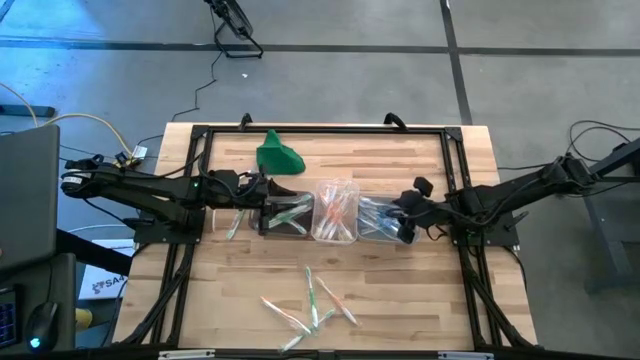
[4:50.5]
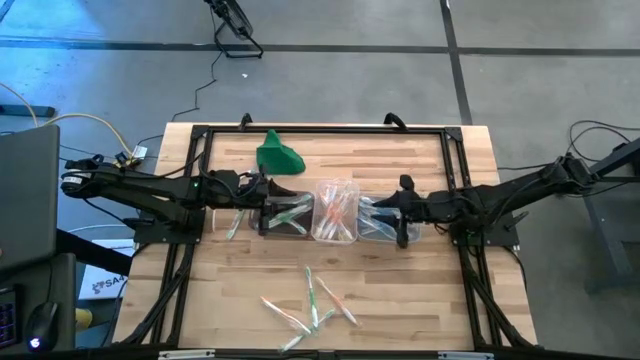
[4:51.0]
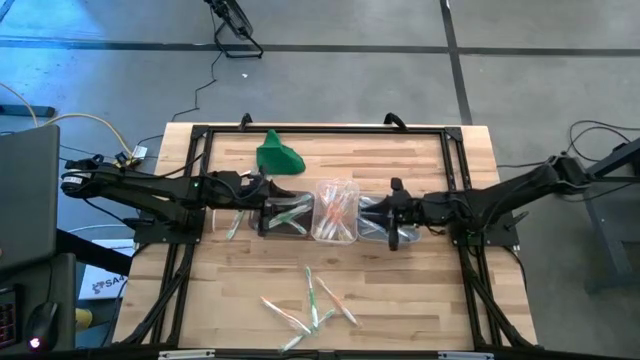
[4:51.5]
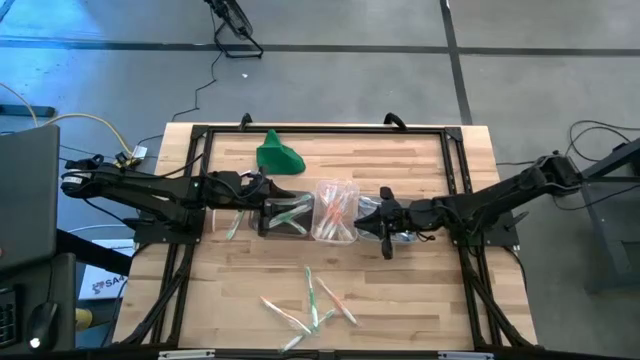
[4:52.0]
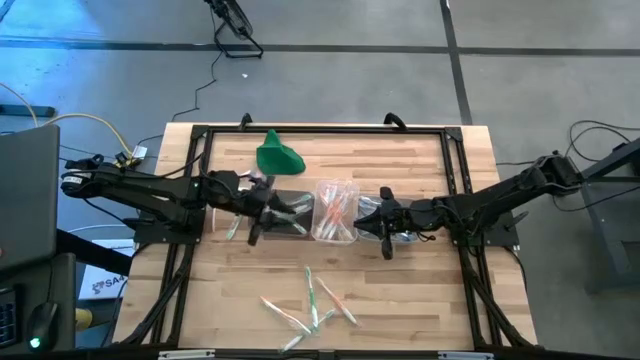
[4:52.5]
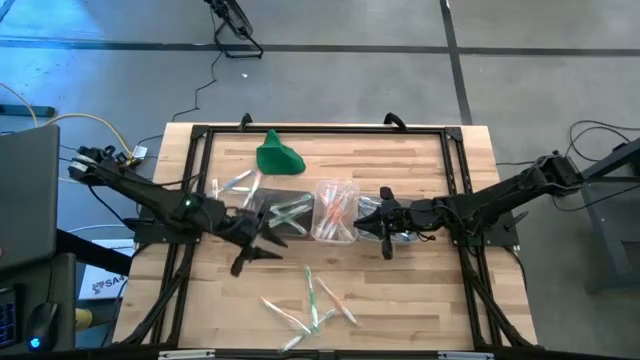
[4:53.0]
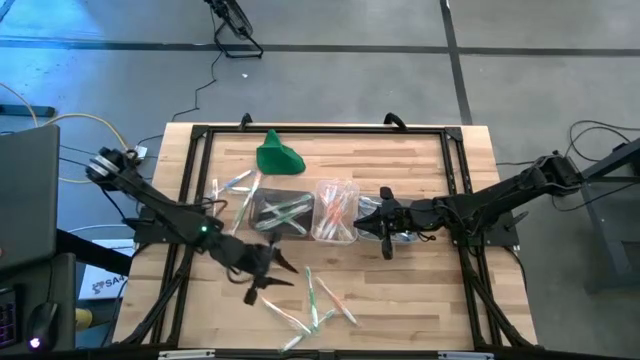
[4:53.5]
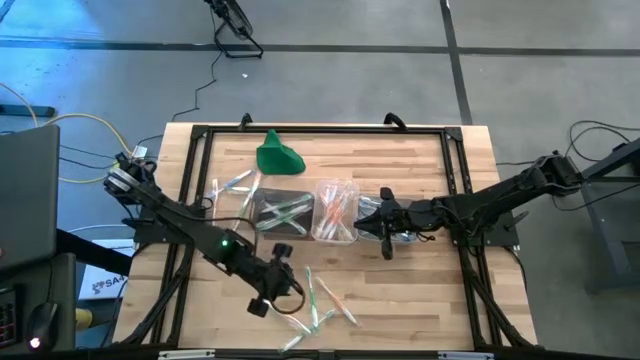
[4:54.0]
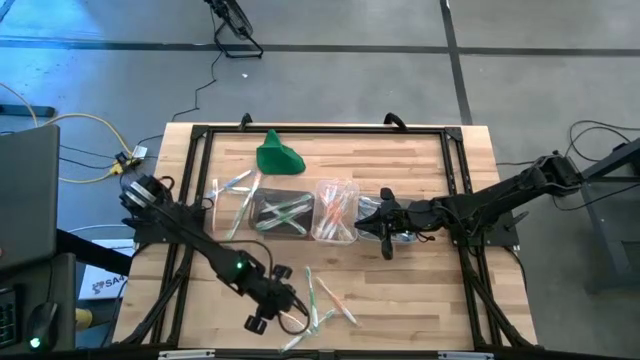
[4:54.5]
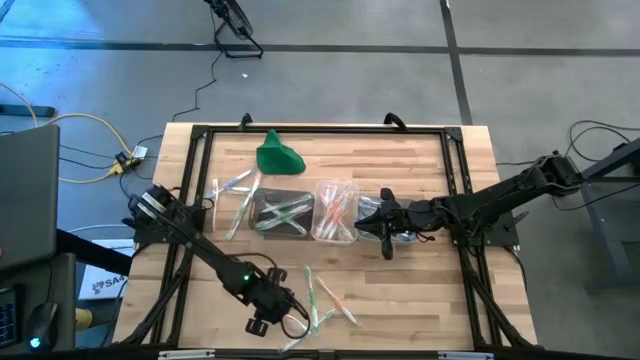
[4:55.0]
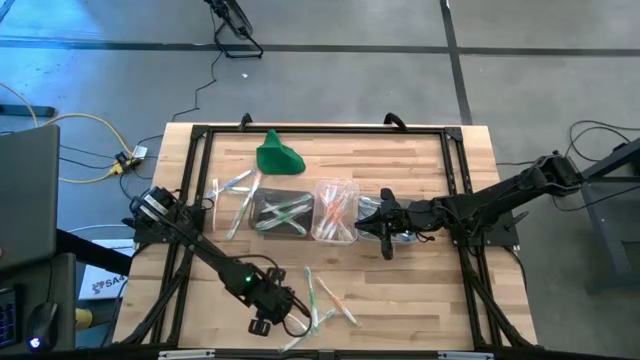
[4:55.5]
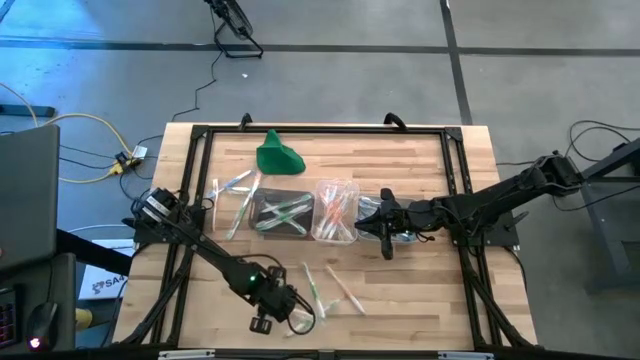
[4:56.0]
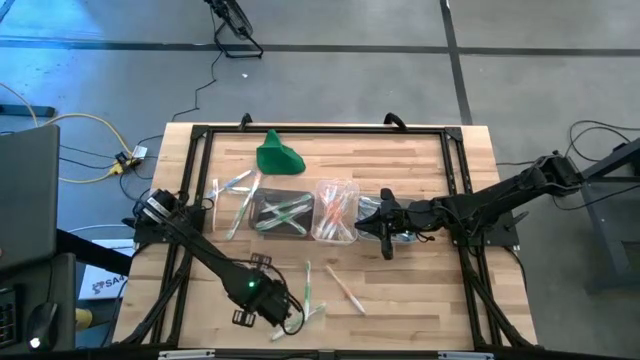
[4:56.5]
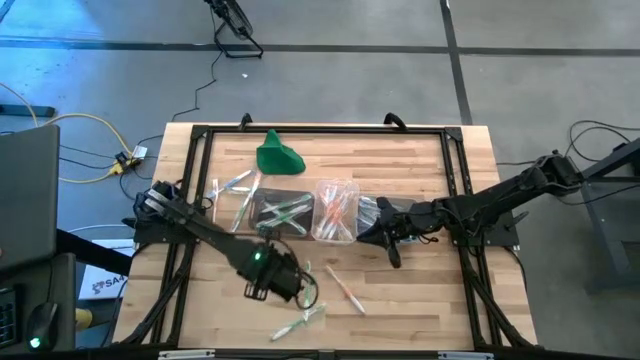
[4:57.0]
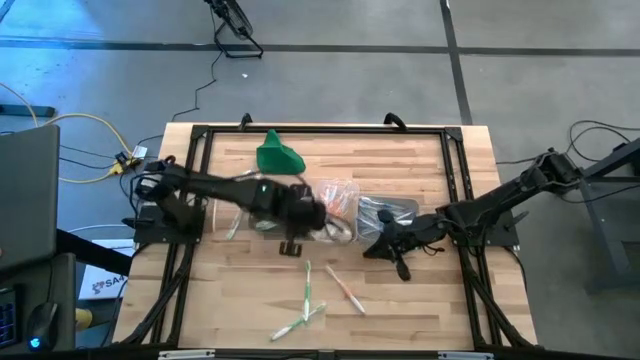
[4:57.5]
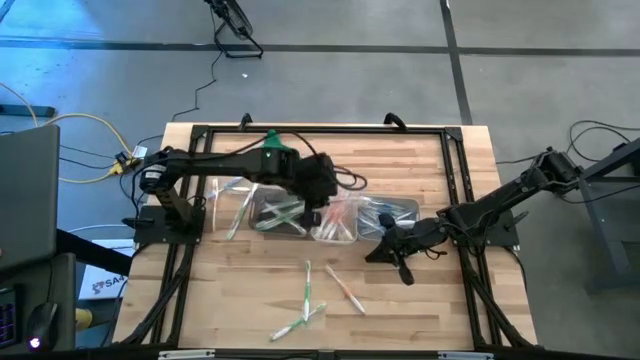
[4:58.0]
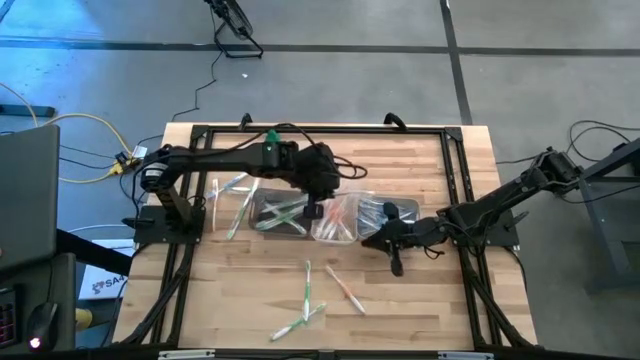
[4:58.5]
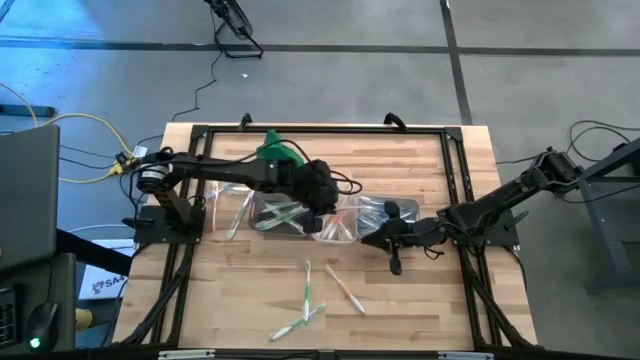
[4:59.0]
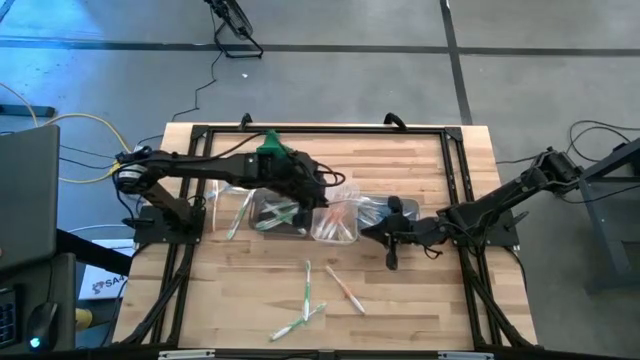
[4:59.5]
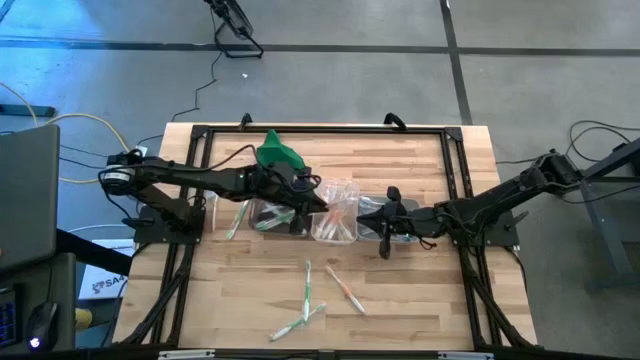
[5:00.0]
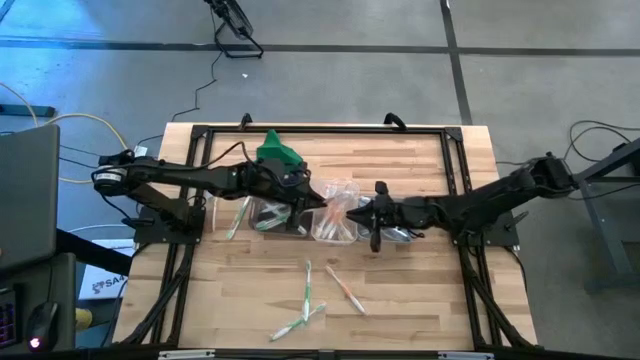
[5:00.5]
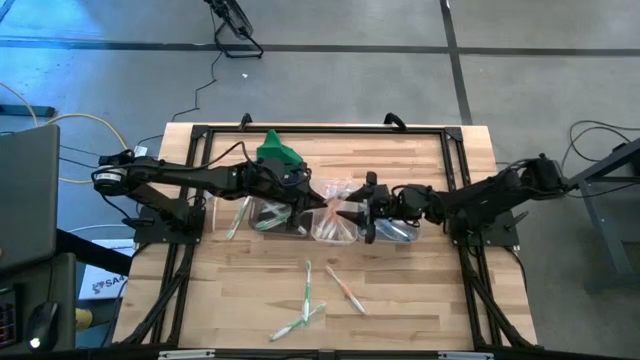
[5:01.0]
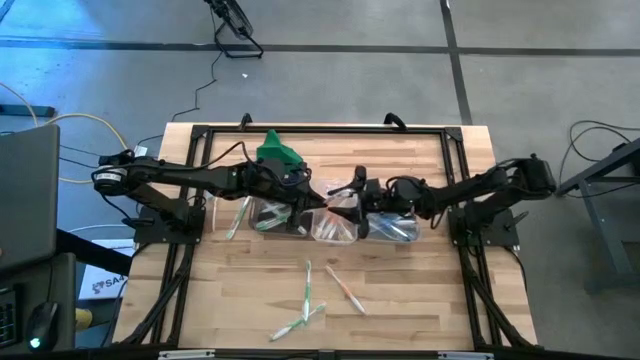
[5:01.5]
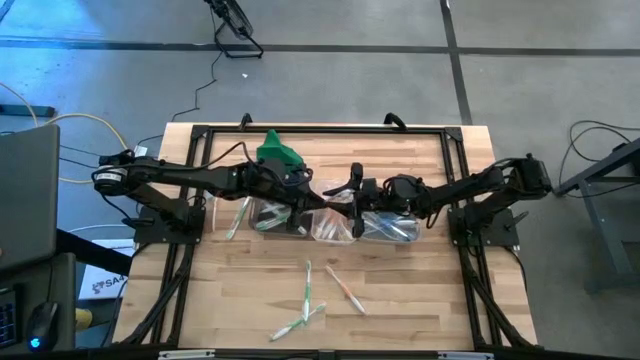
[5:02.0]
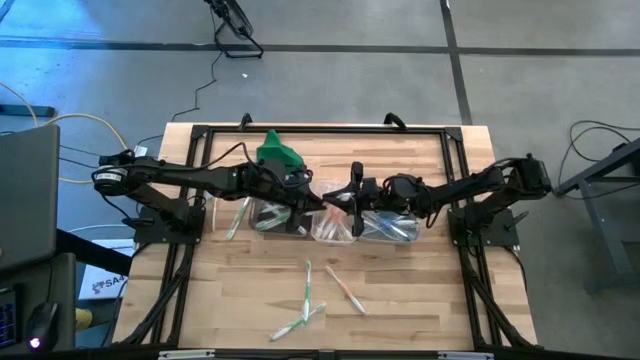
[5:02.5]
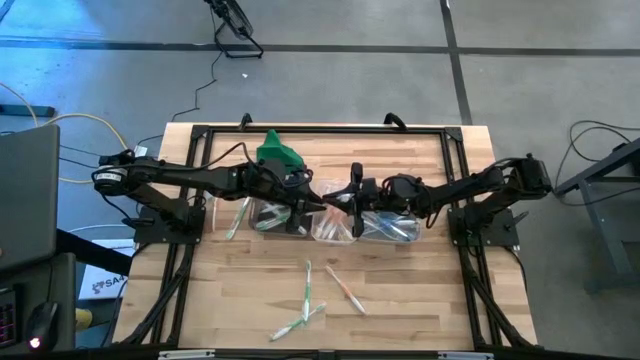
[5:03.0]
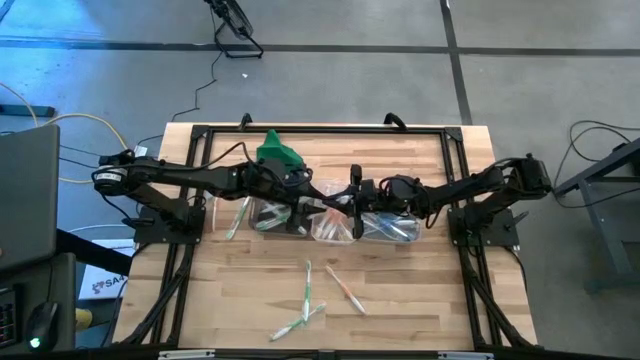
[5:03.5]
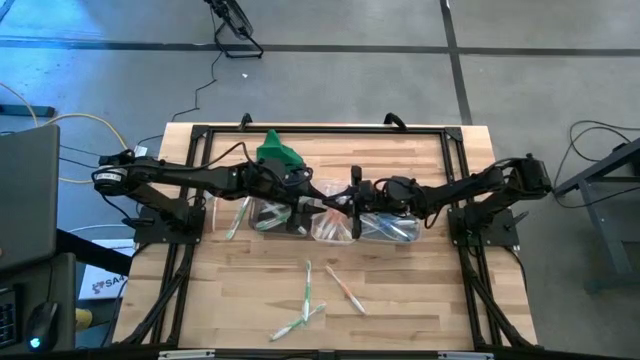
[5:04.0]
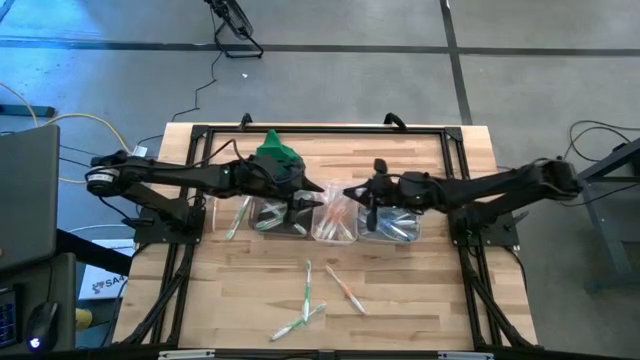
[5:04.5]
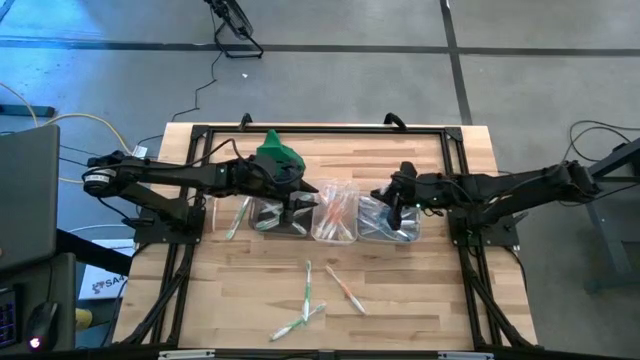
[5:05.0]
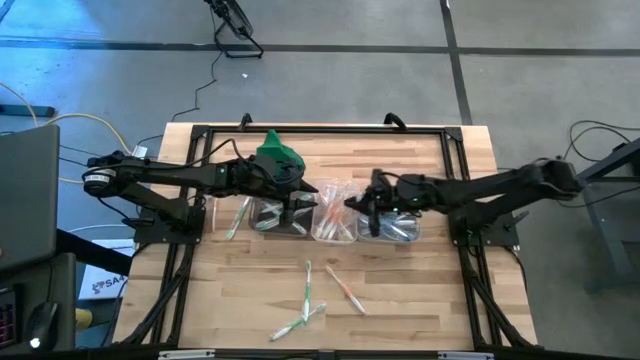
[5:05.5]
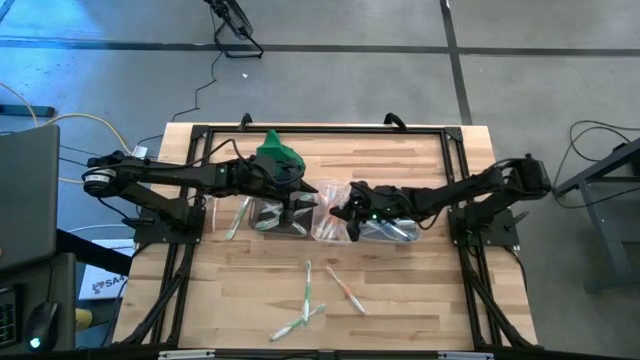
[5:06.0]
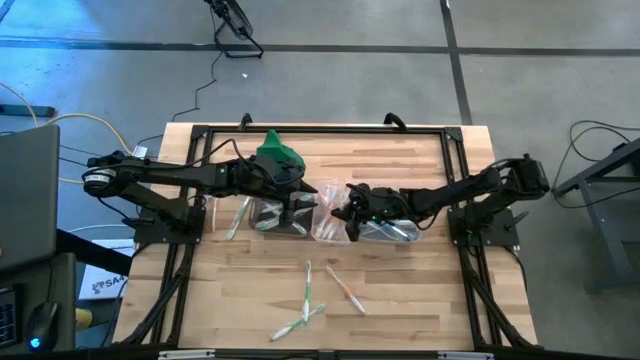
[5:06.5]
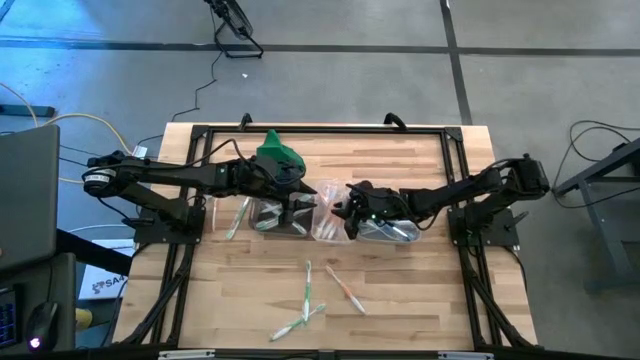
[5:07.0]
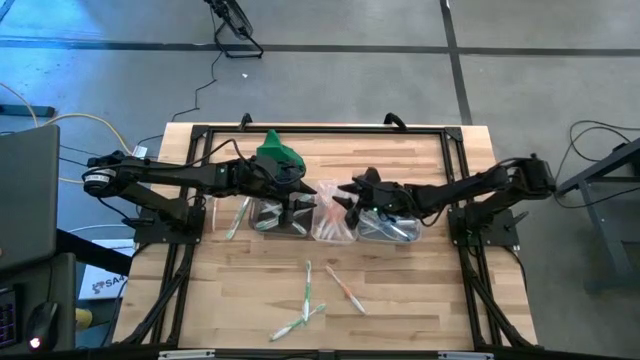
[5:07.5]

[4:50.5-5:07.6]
Task: Pick & Place Toothbrushes
Put the orange toothbrush into the transparent bin

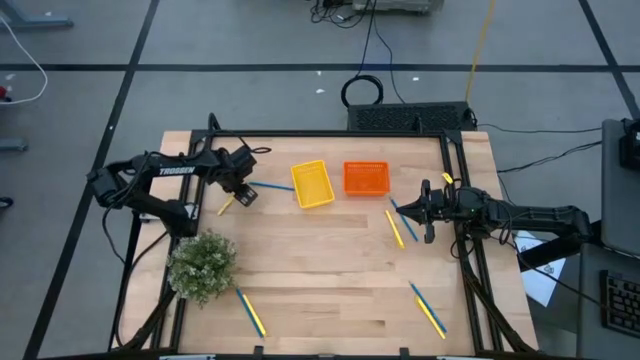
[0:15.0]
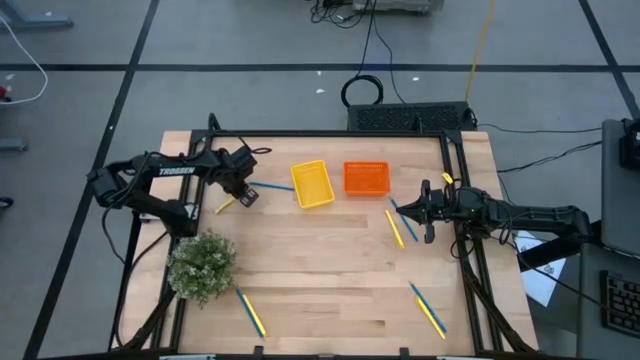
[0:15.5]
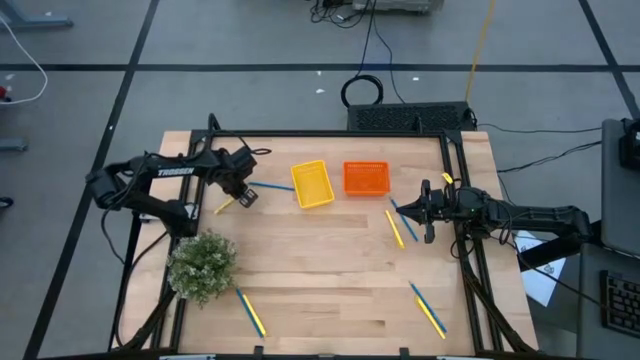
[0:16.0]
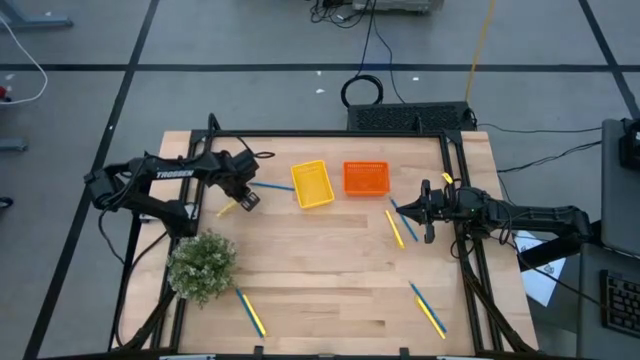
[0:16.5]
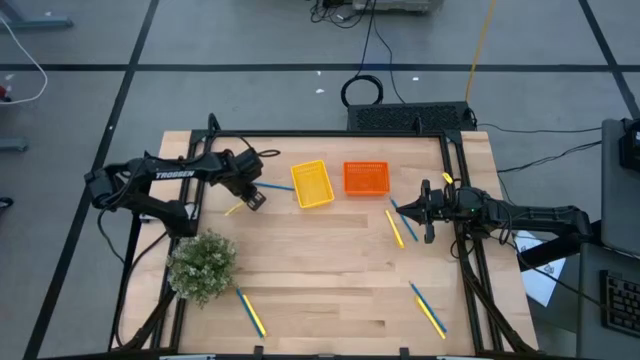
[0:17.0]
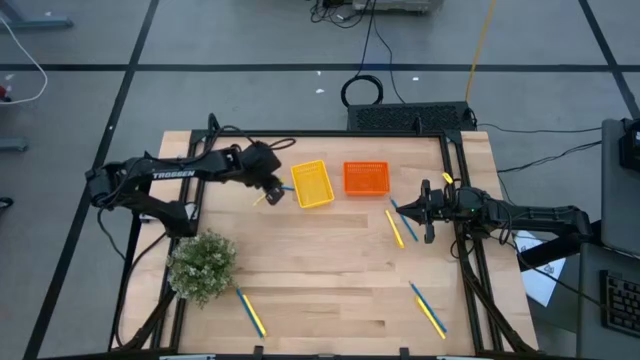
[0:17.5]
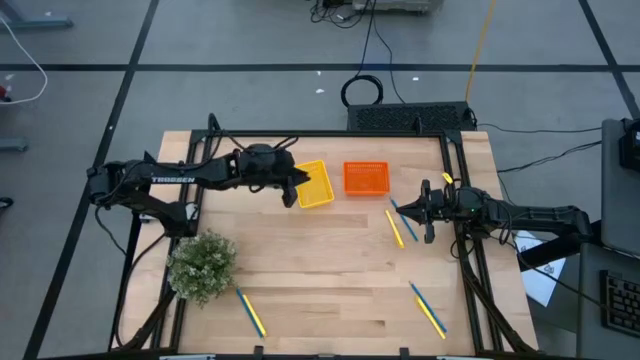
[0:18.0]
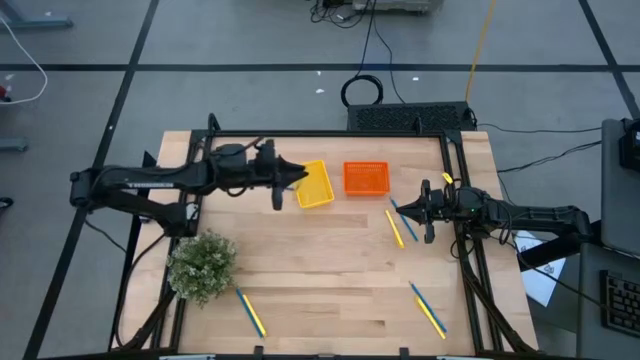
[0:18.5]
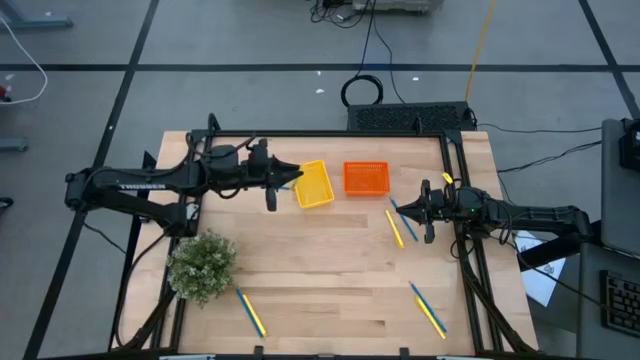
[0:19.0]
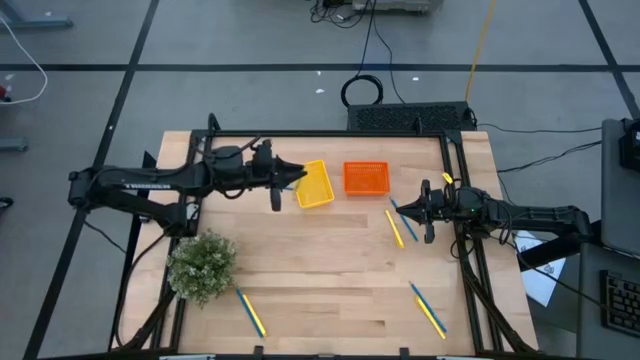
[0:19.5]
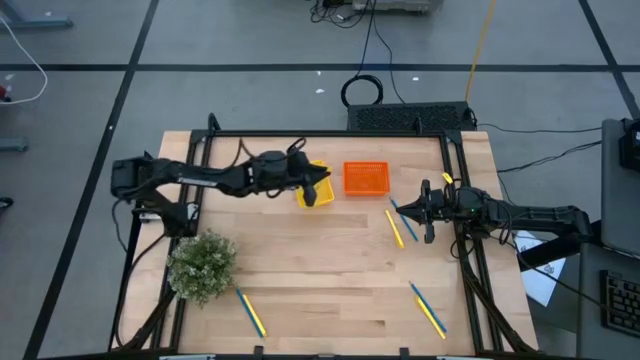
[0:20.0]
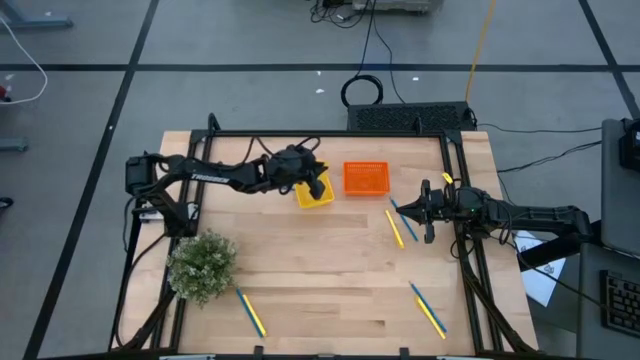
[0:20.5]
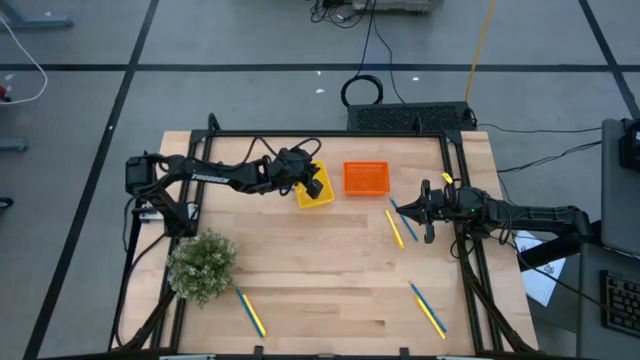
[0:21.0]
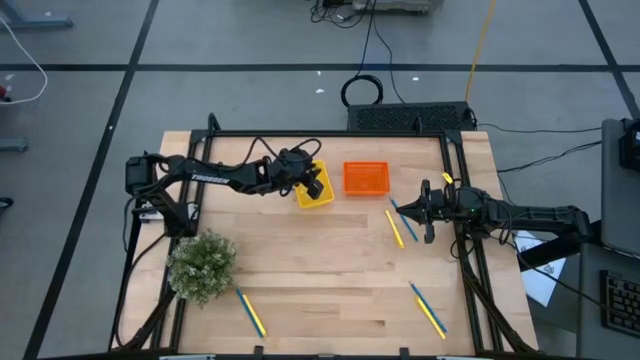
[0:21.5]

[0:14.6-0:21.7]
Task: Sort pens & pencils
Put the top left yellow pen into the yellow basket
